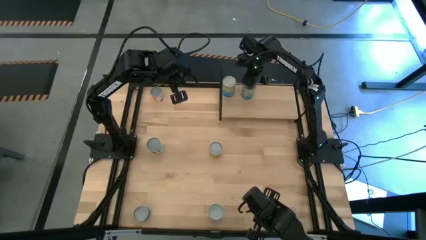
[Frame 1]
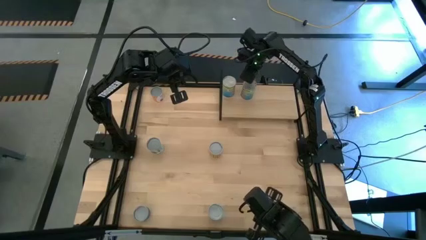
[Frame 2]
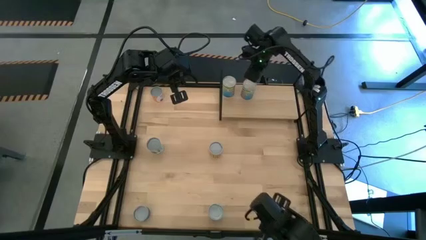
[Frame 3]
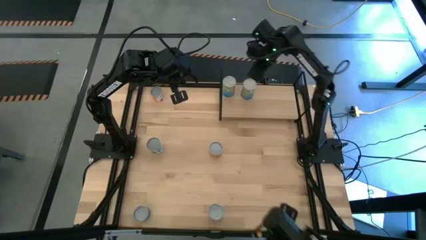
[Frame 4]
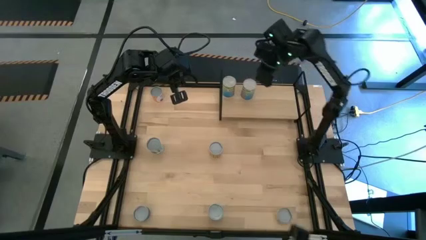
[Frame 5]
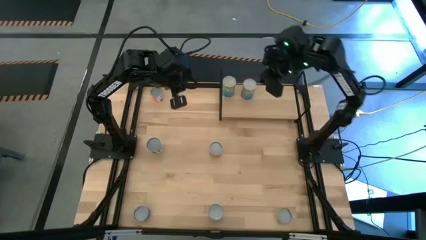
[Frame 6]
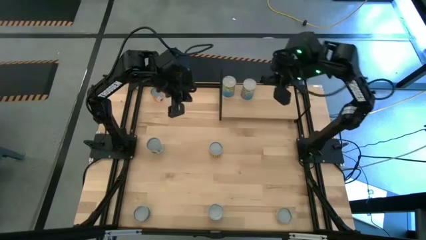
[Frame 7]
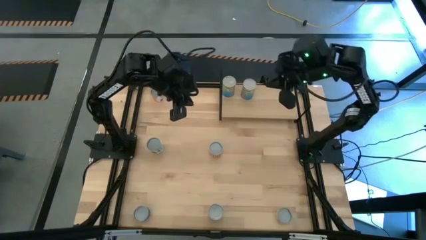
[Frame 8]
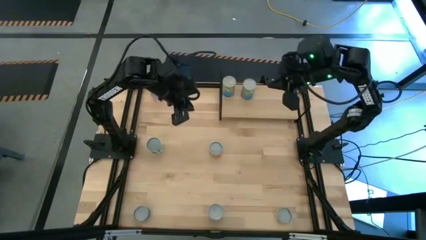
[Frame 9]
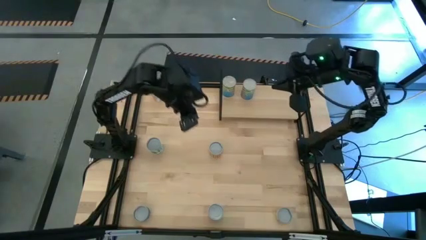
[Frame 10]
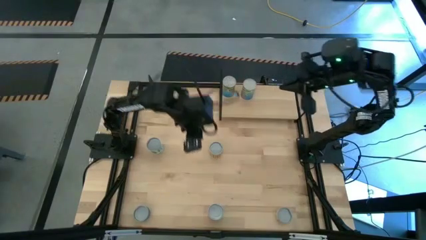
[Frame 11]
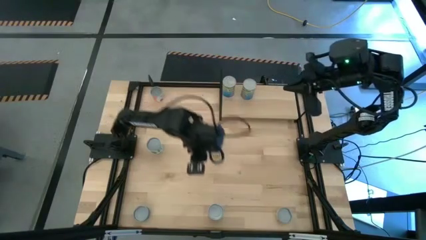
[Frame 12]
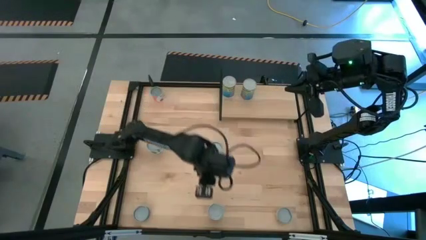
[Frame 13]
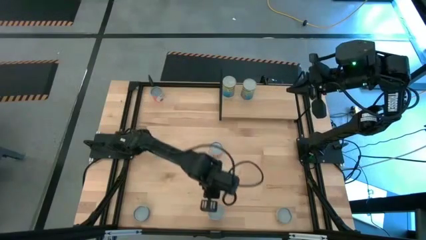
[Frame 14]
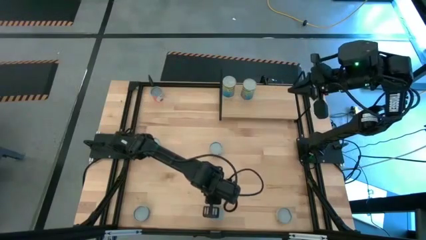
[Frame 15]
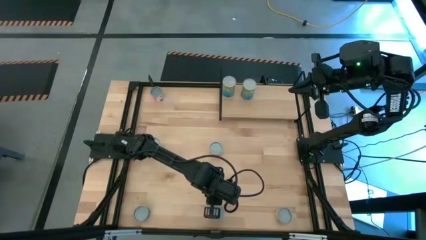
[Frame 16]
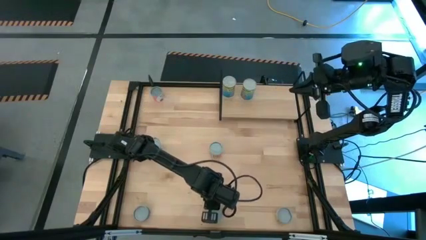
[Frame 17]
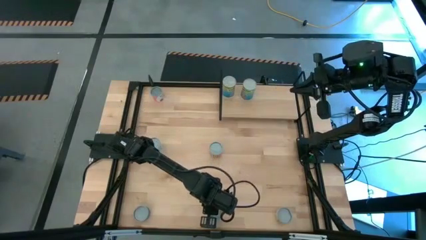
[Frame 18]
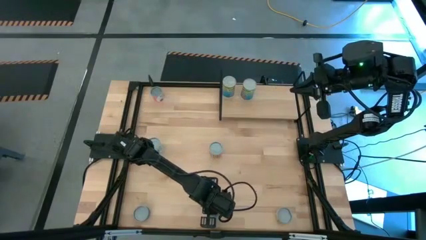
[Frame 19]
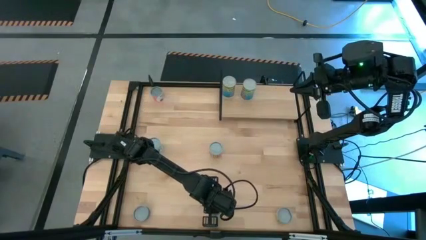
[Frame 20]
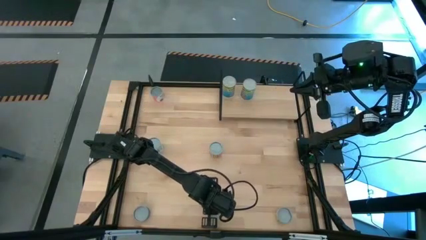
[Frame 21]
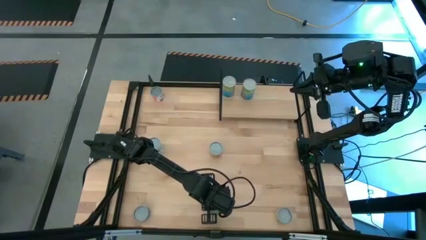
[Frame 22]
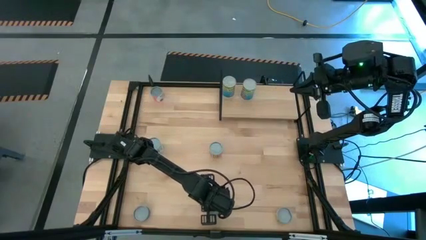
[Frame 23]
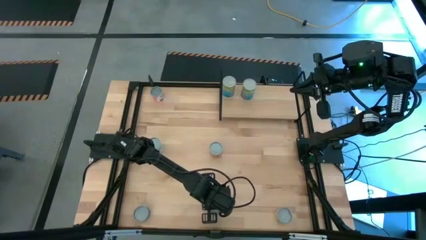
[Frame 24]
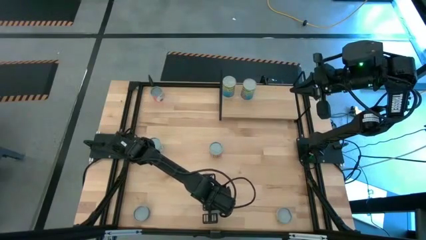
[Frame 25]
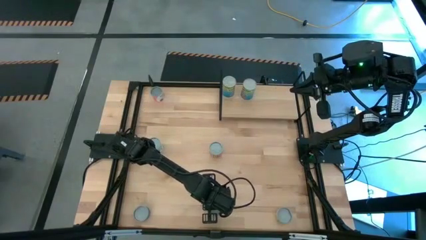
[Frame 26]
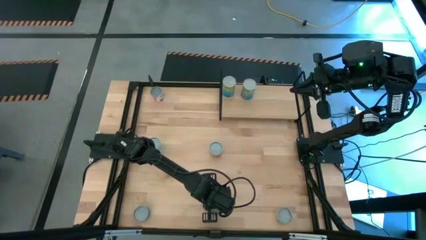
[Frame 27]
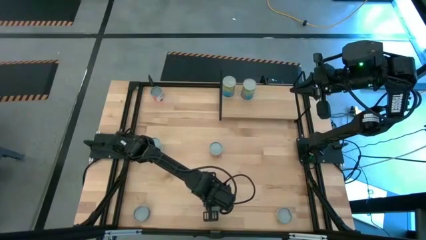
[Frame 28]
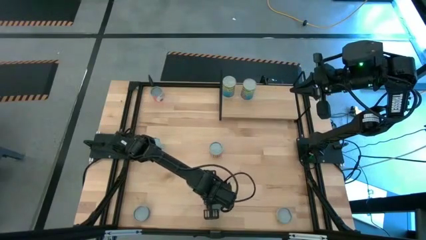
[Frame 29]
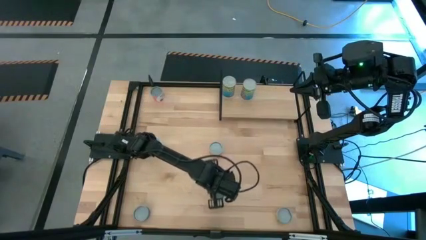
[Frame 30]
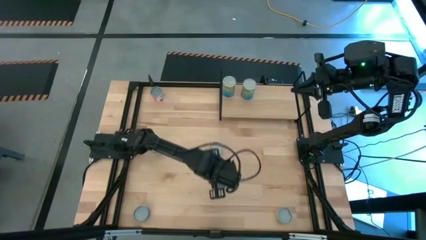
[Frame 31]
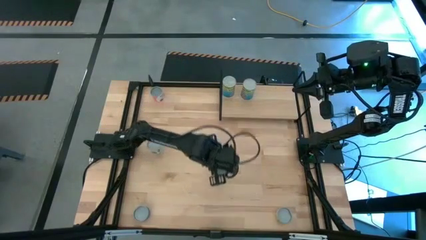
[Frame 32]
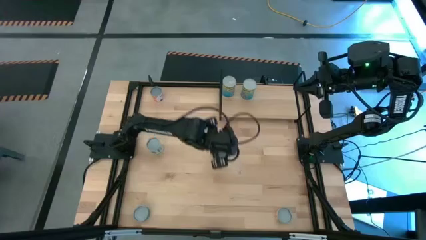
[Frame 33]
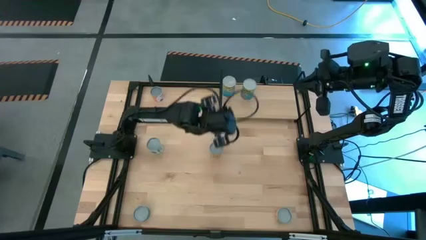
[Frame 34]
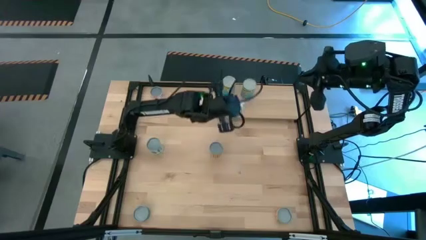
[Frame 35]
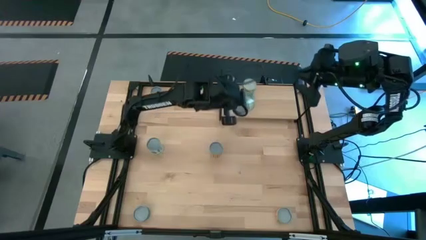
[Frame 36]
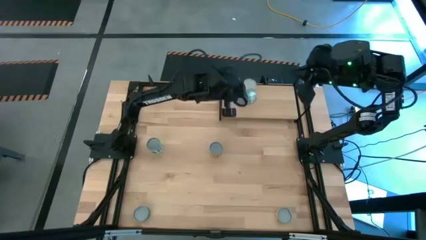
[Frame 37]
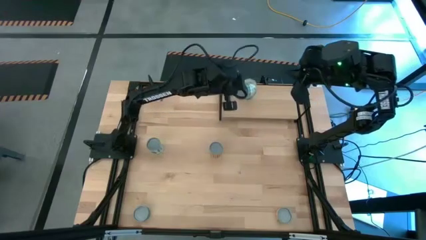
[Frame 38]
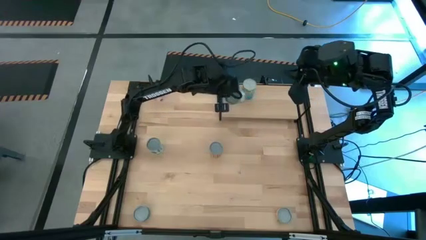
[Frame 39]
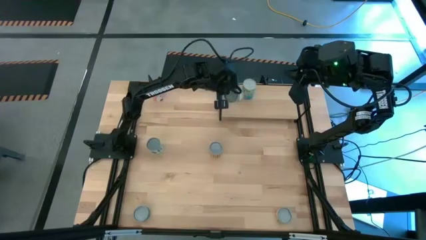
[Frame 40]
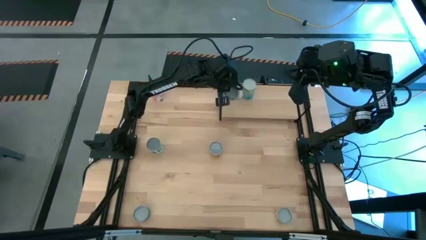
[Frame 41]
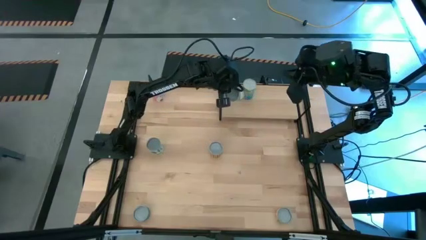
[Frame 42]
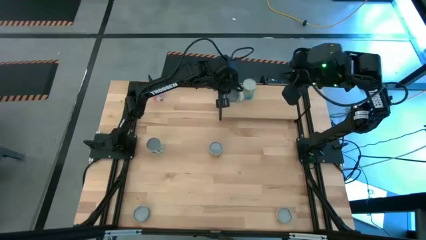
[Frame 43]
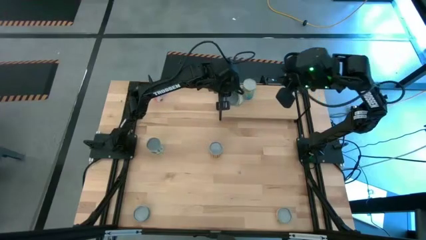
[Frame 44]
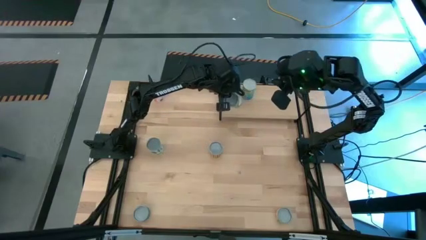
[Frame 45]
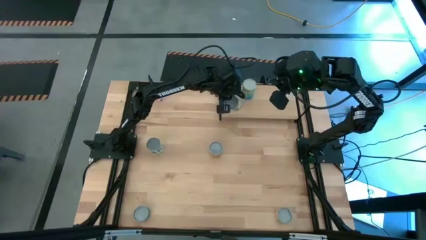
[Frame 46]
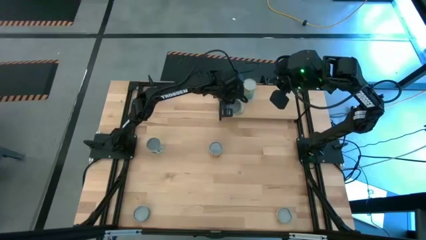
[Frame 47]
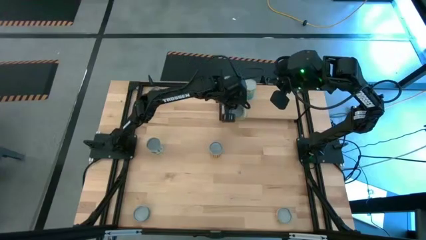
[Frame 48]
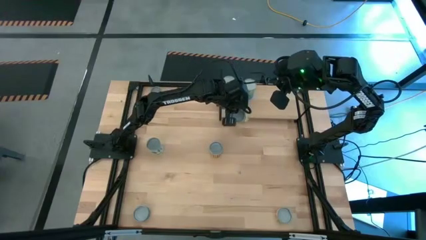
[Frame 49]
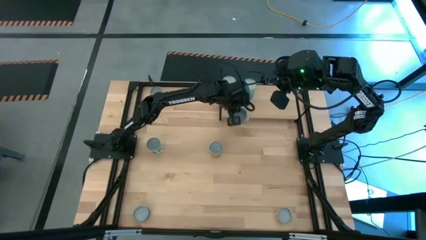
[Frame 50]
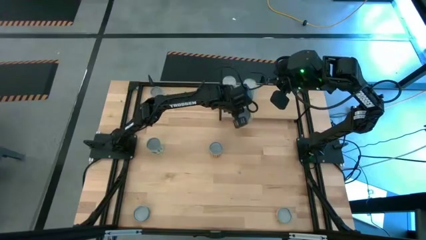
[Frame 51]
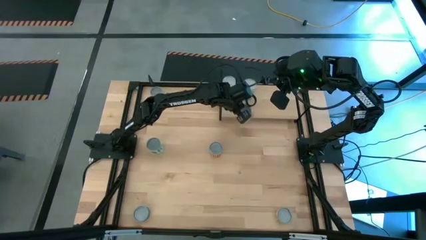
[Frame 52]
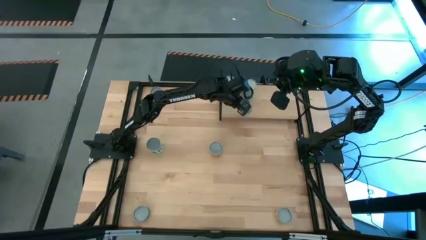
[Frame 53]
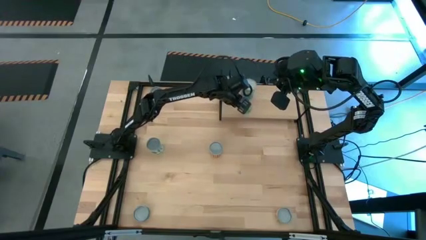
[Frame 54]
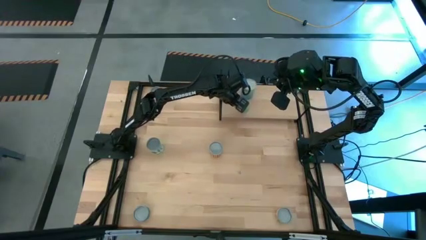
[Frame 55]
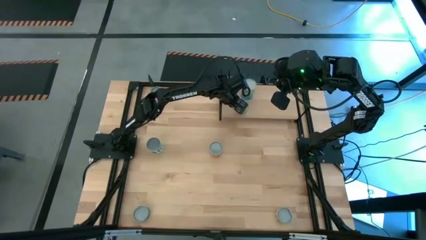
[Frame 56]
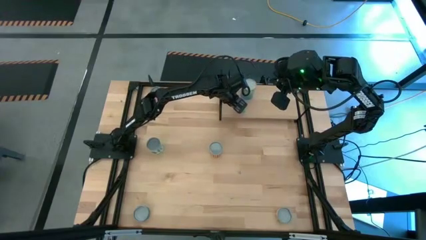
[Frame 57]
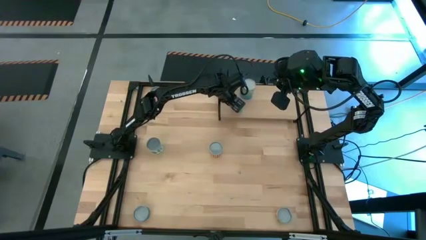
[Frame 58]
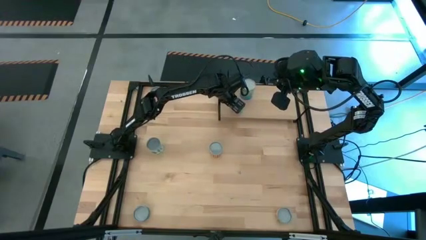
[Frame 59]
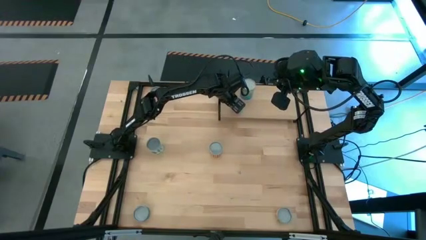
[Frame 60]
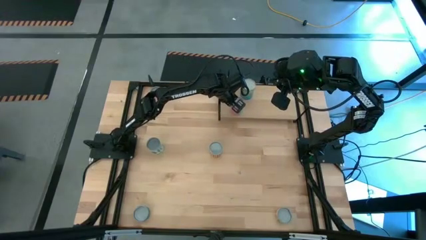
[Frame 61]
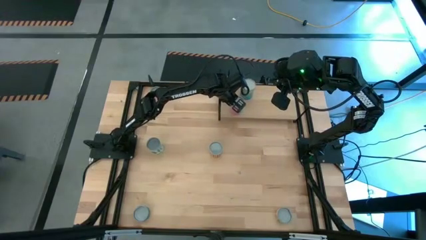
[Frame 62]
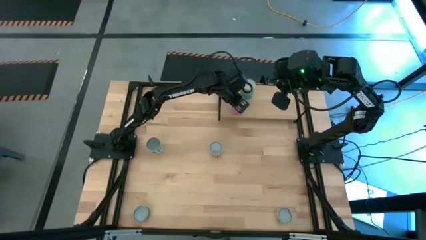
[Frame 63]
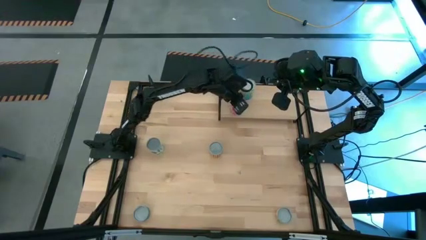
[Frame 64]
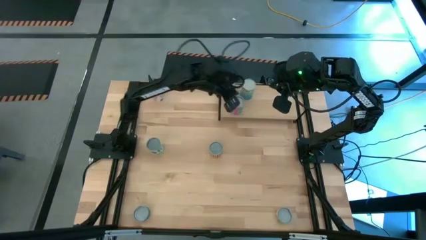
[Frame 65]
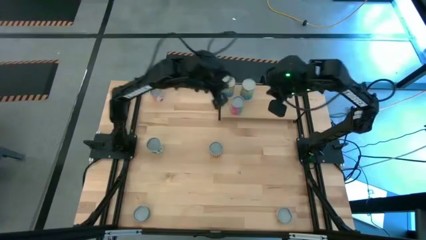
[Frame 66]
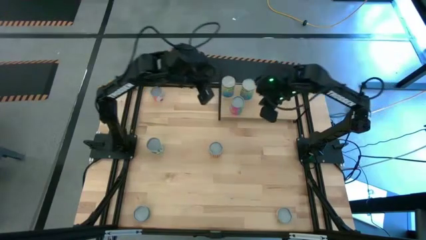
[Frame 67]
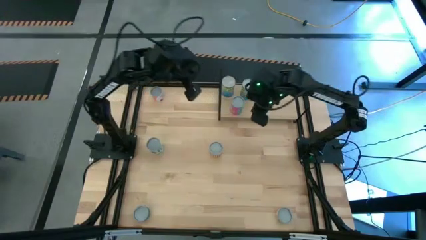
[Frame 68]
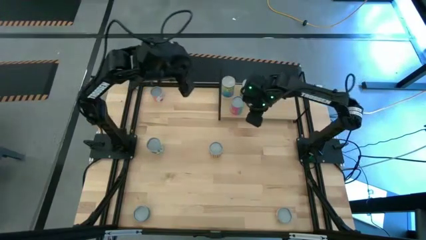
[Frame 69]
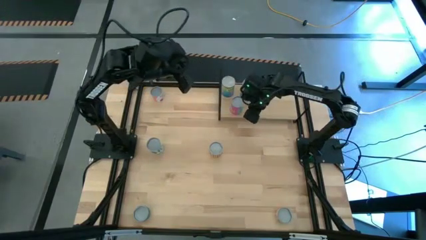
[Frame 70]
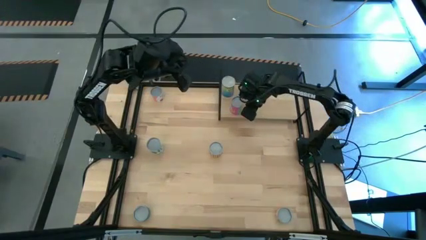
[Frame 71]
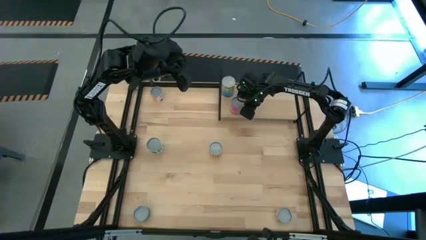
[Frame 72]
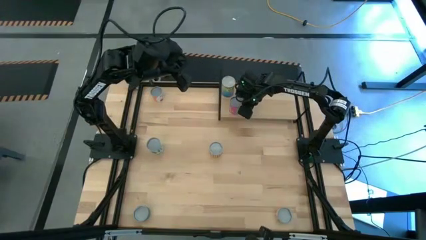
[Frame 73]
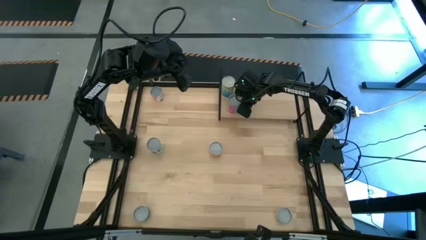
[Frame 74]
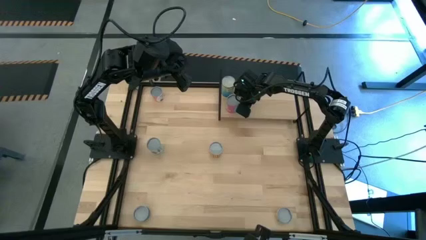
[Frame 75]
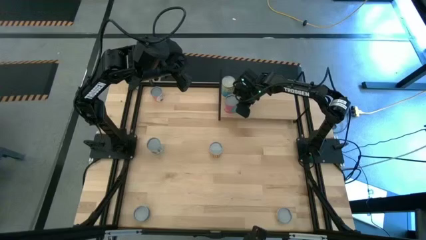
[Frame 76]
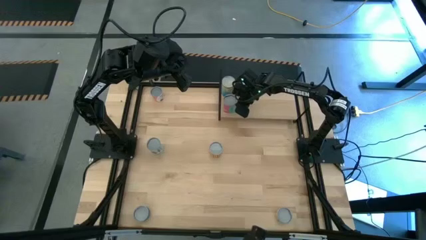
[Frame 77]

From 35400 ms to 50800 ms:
Task: Pick and place cans onto a shelf
Put the canned chickens on the shelf
